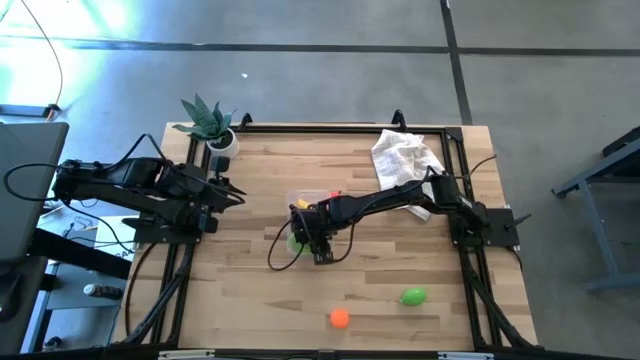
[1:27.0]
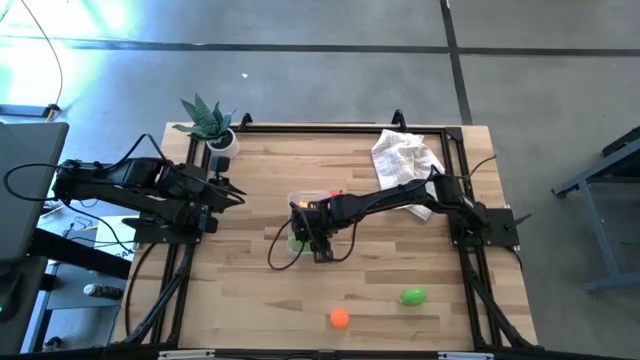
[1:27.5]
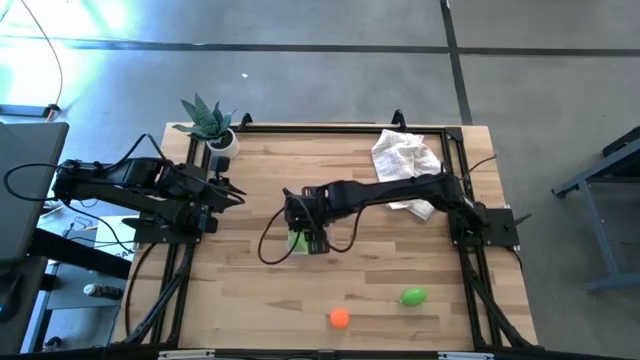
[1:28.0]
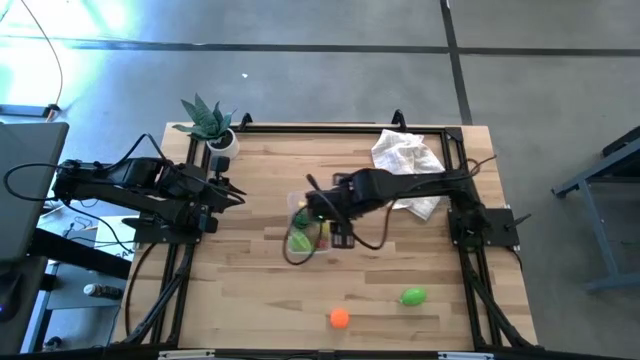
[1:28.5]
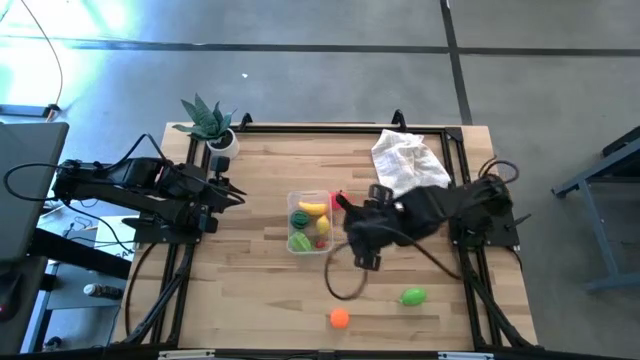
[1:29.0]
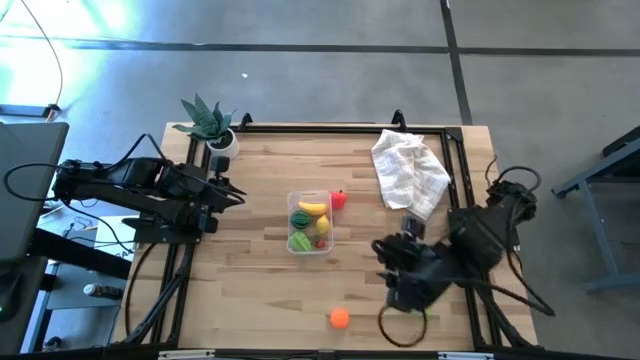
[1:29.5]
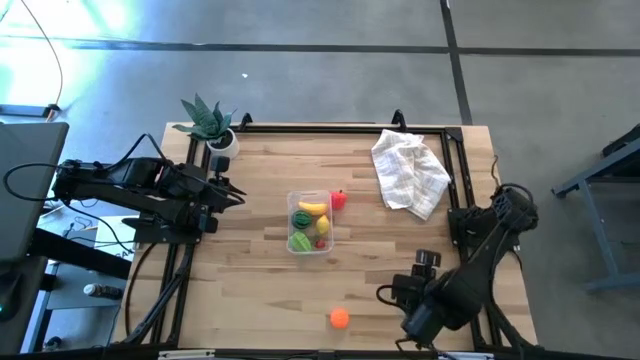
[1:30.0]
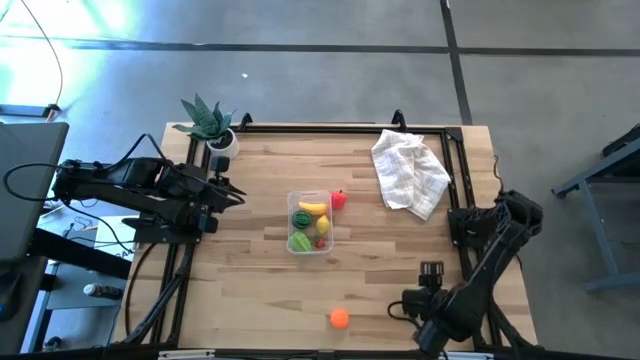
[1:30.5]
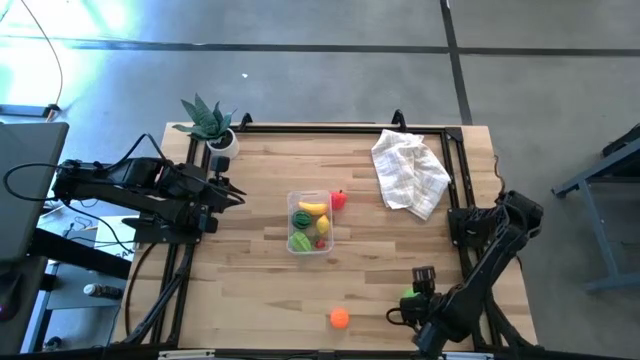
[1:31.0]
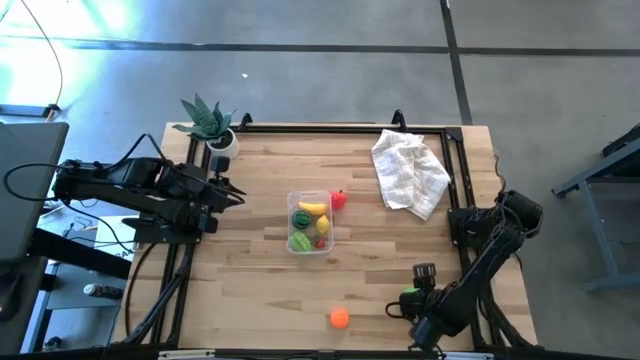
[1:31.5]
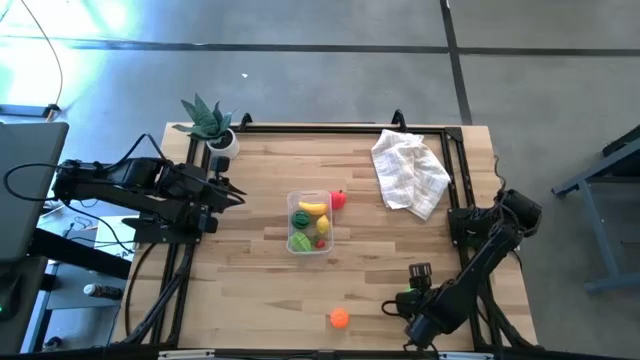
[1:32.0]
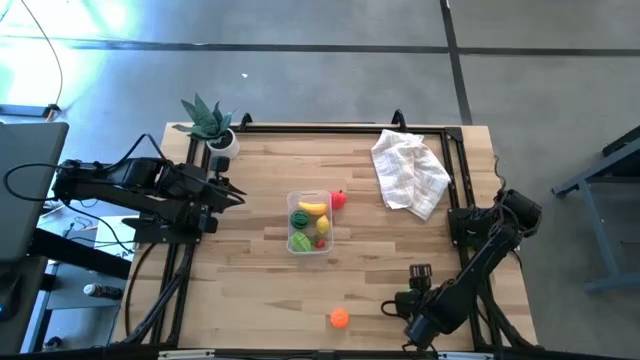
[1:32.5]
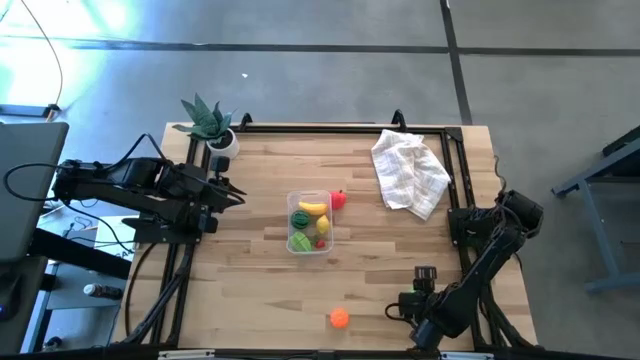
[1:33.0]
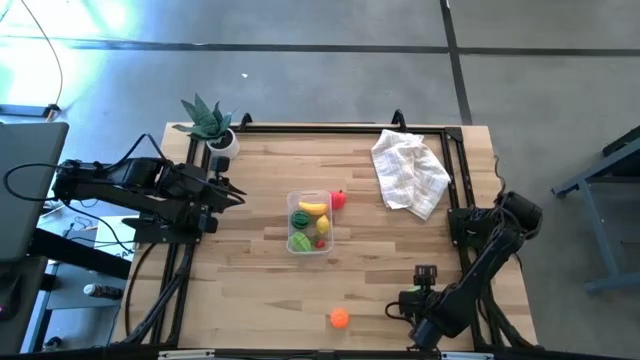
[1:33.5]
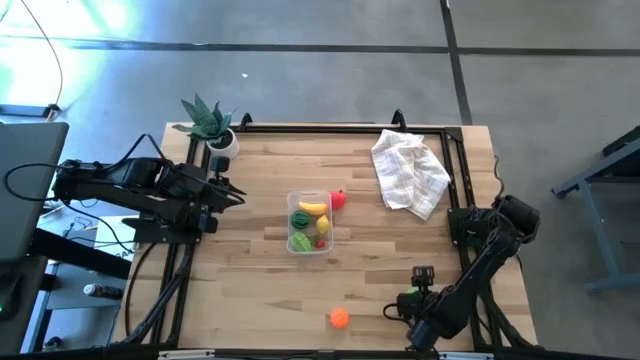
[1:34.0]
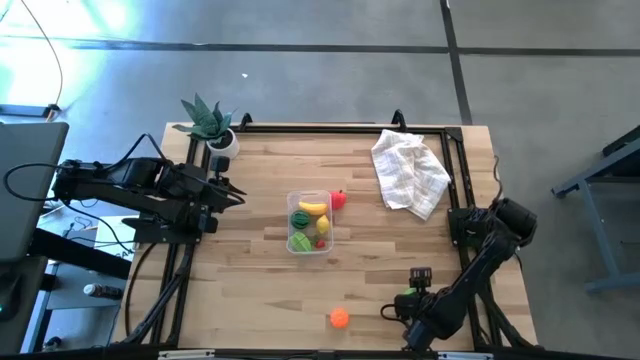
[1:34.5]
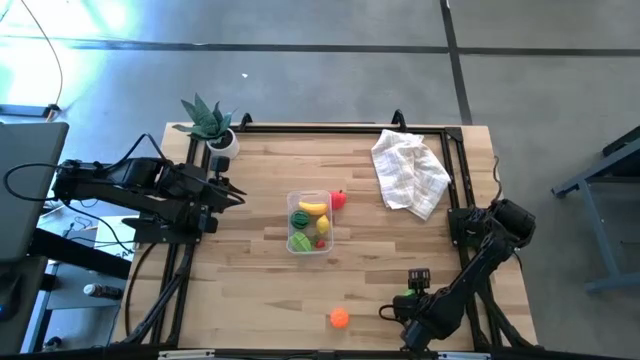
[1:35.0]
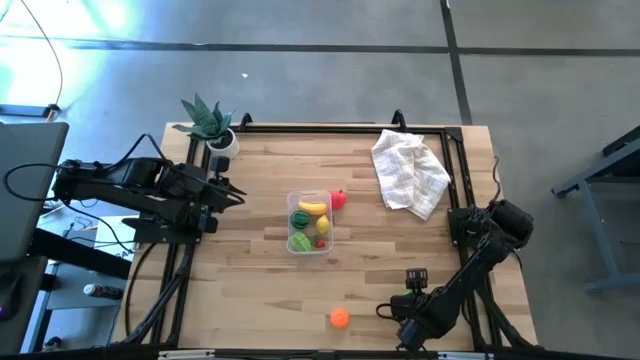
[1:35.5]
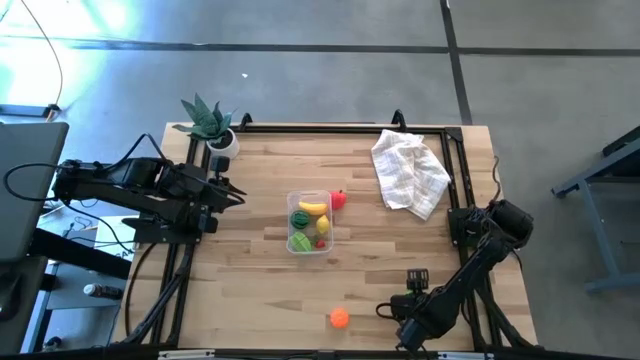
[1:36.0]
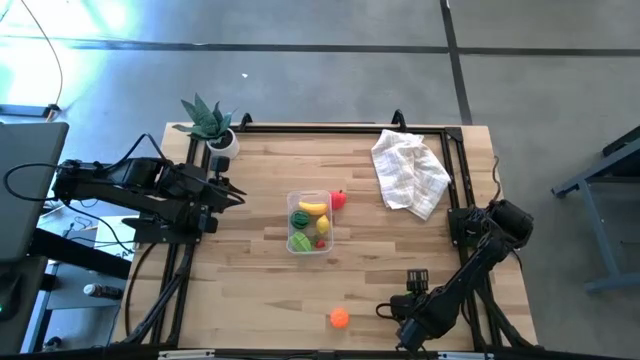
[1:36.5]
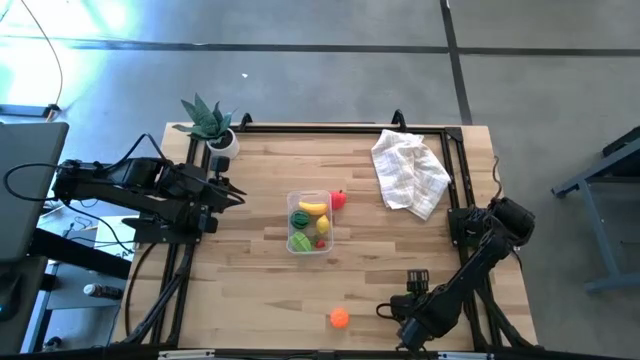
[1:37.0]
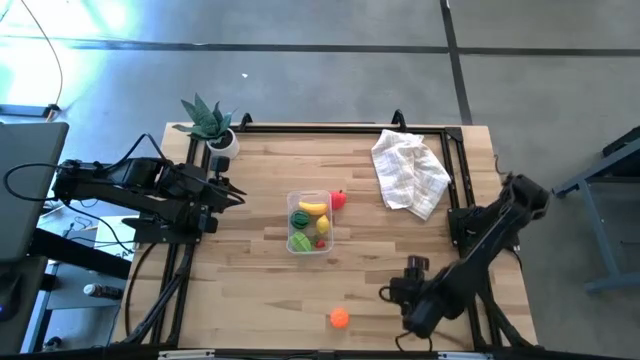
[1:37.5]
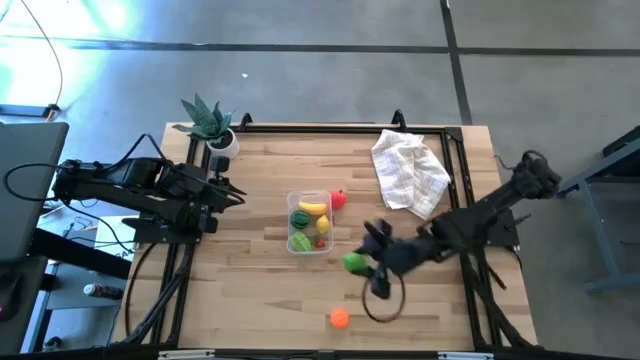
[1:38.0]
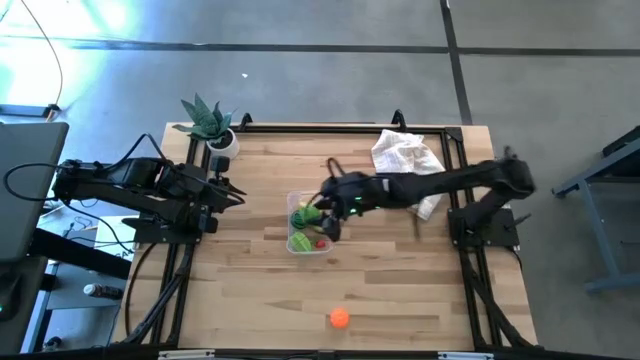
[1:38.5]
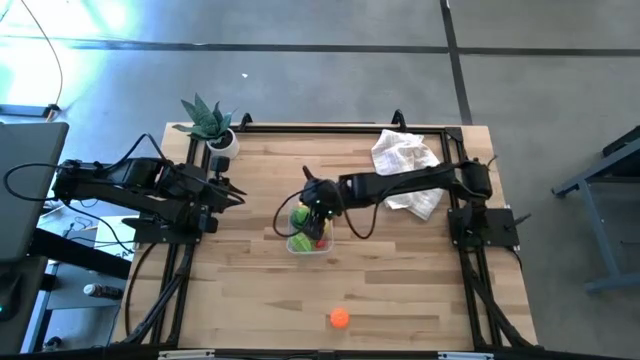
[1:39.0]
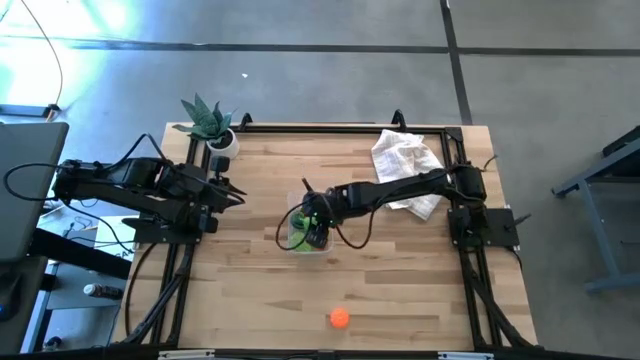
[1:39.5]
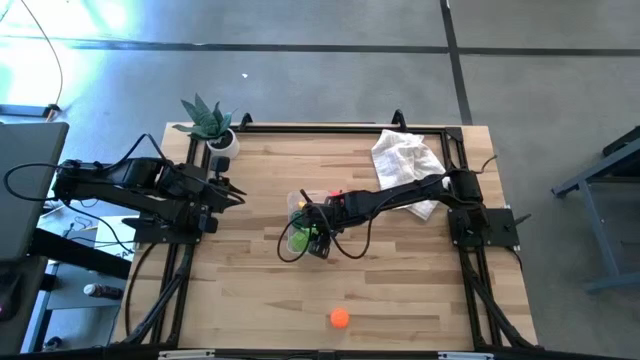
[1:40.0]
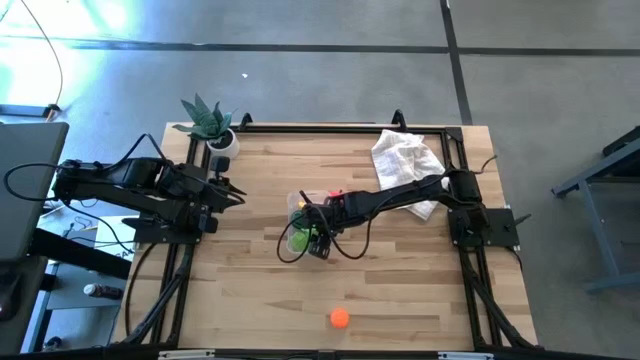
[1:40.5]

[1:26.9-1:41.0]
Task: Pick and placing Produce into tupperware
Put the melon into the bin

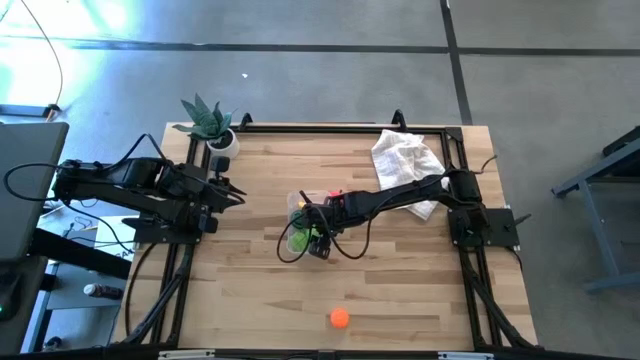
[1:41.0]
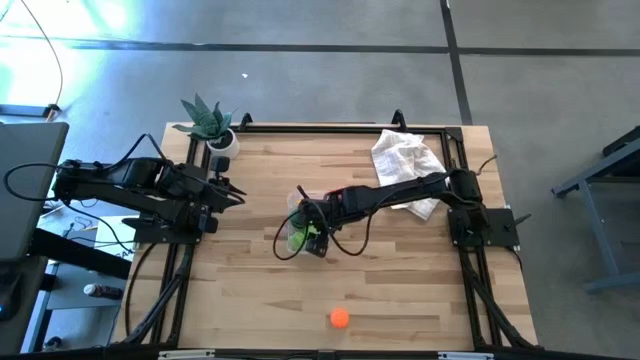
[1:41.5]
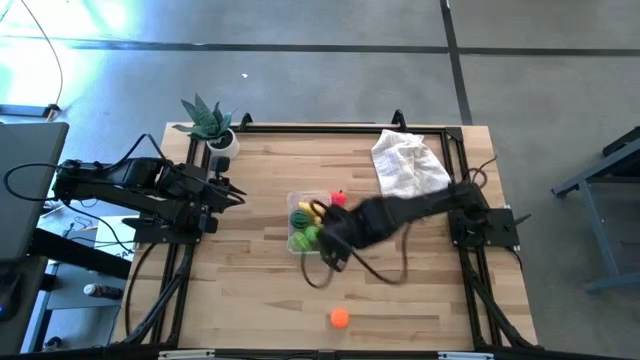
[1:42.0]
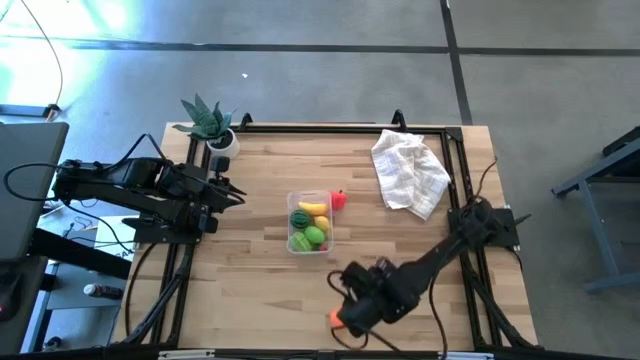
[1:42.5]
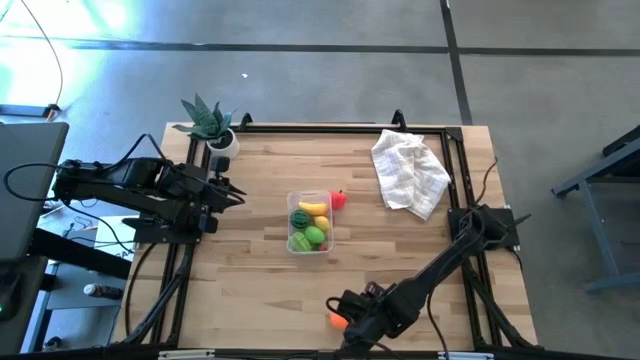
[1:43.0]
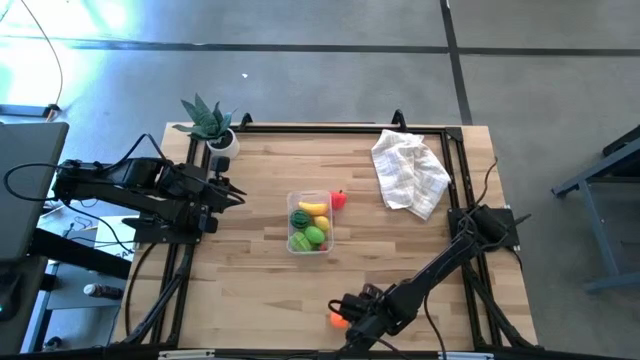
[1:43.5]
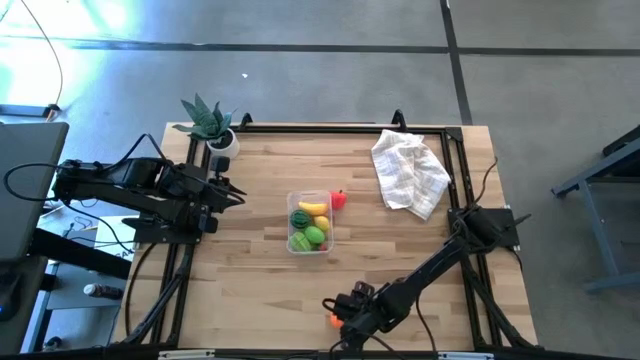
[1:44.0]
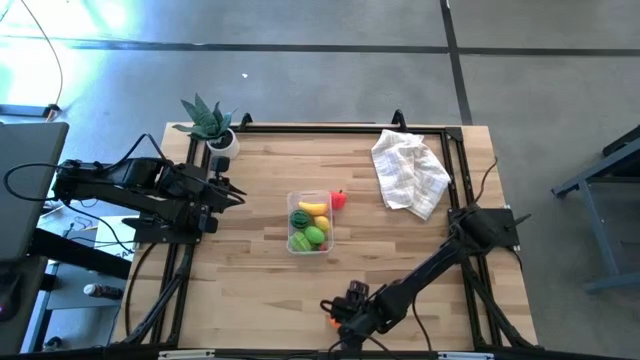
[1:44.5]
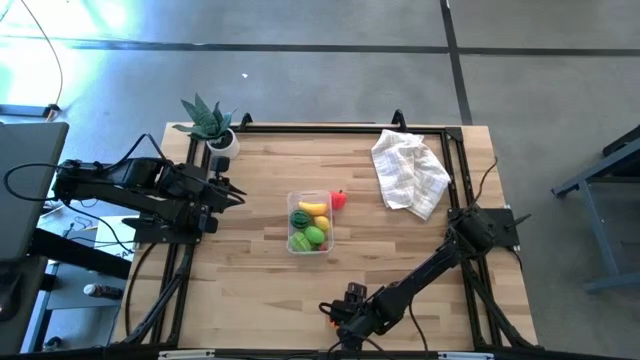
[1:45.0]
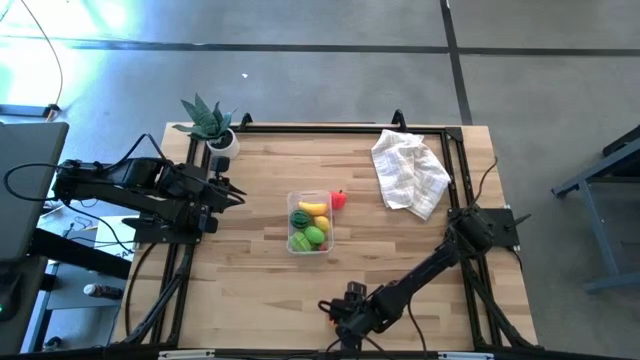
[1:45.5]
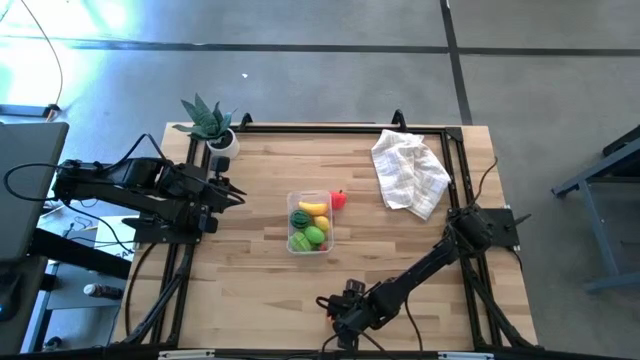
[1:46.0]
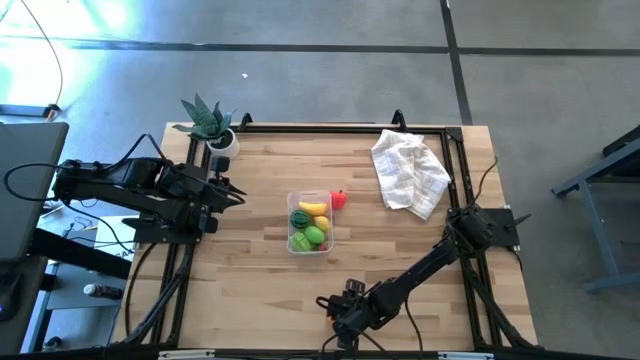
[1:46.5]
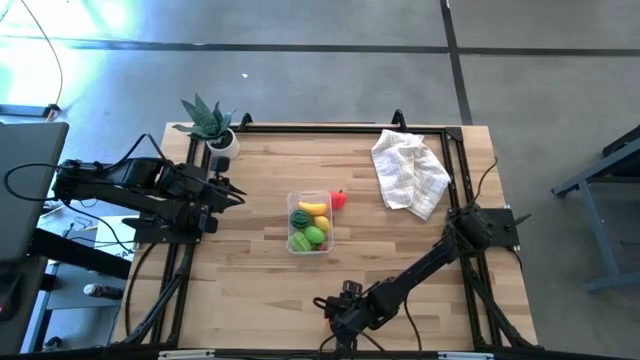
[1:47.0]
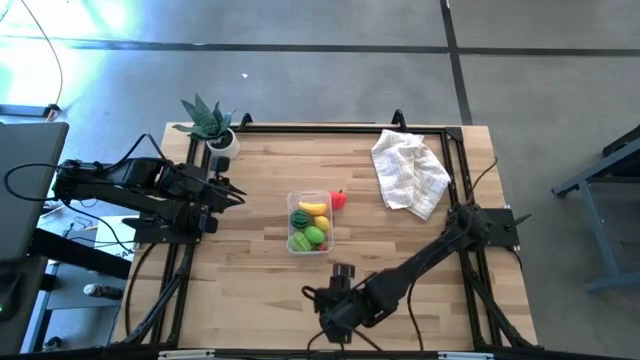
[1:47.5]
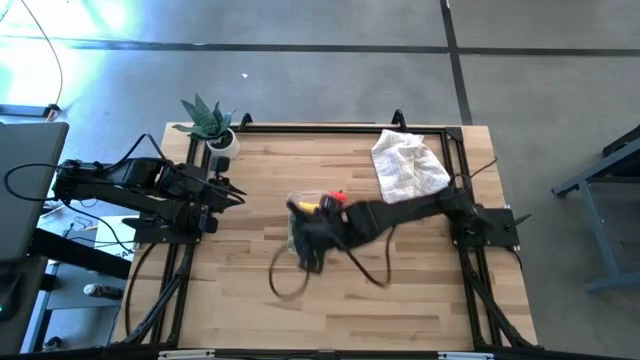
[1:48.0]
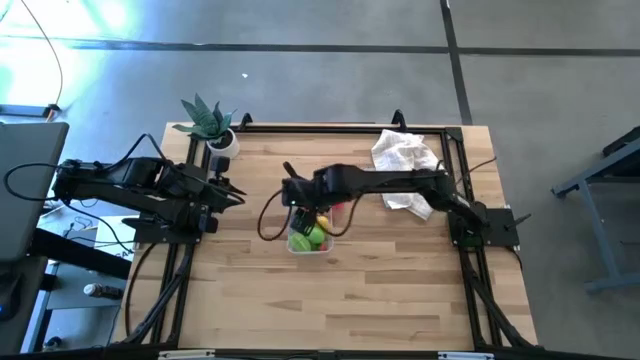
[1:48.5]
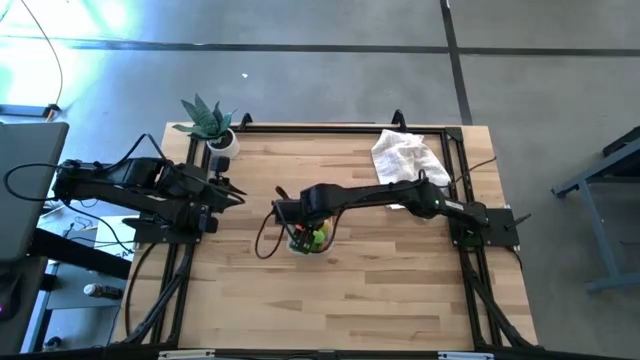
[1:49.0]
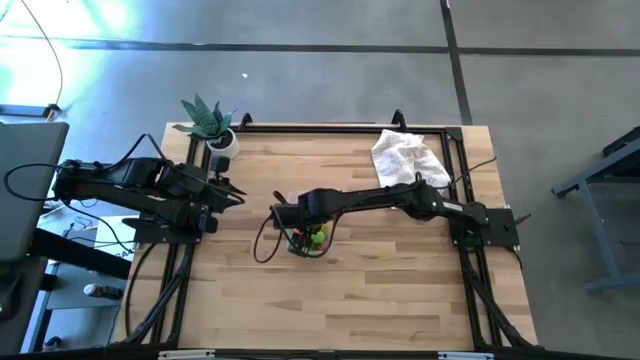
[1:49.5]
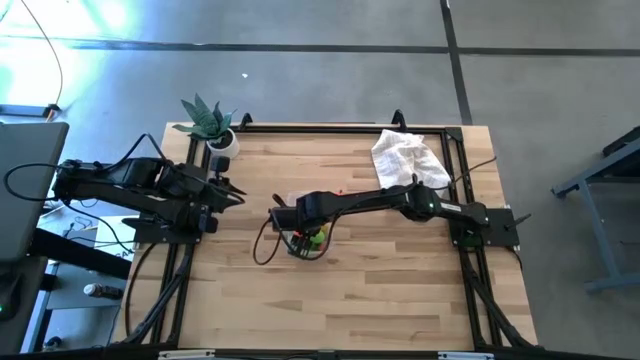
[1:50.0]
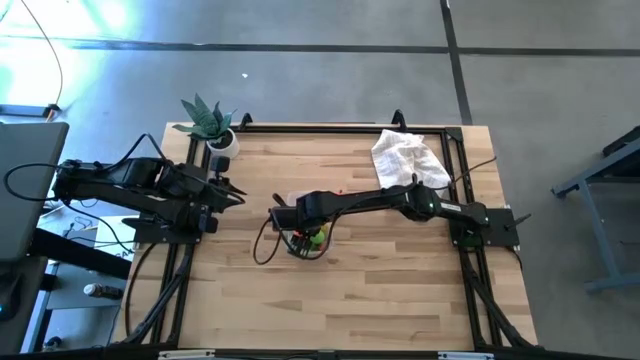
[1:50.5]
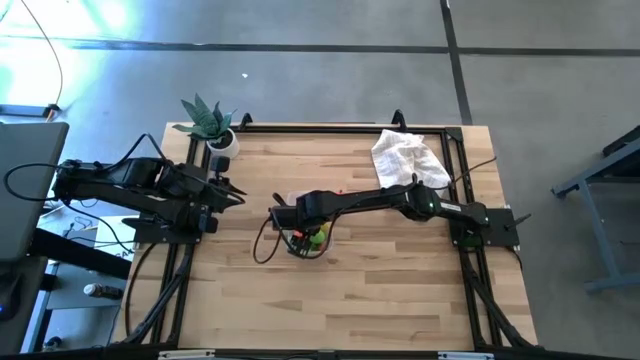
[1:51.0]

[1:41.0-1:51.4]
Put the tangerine into the bin
